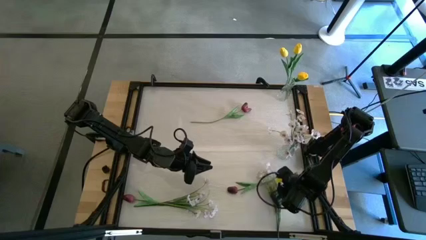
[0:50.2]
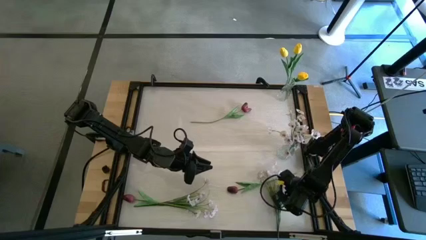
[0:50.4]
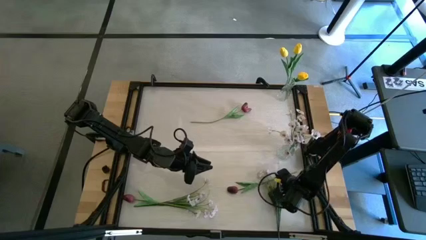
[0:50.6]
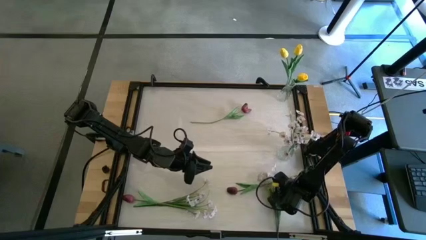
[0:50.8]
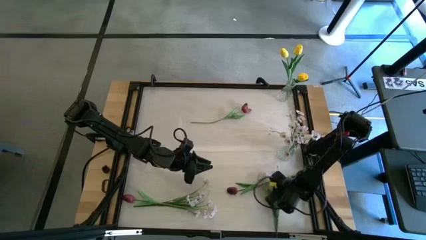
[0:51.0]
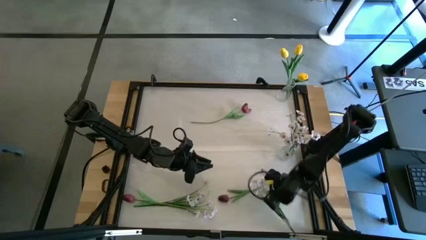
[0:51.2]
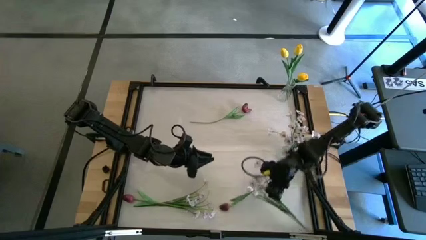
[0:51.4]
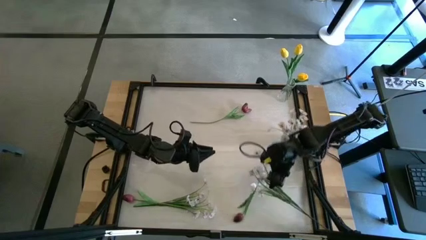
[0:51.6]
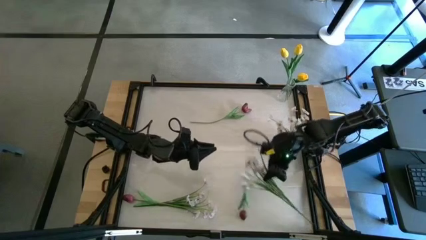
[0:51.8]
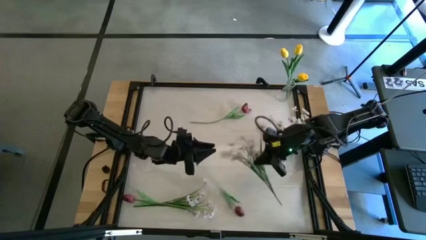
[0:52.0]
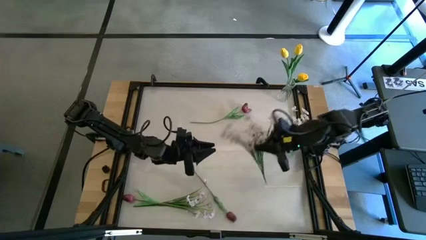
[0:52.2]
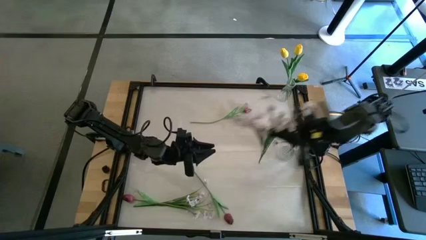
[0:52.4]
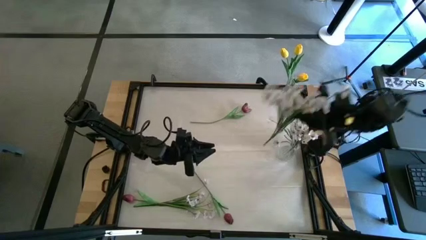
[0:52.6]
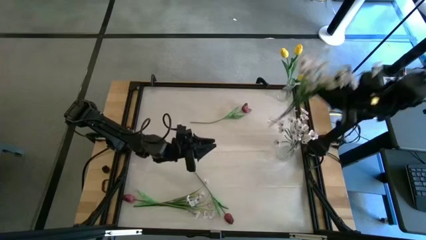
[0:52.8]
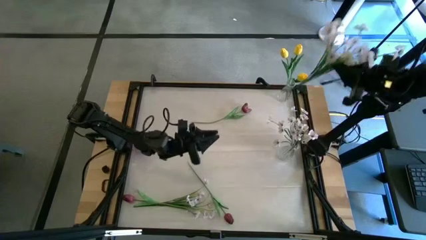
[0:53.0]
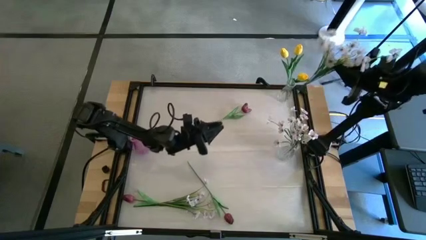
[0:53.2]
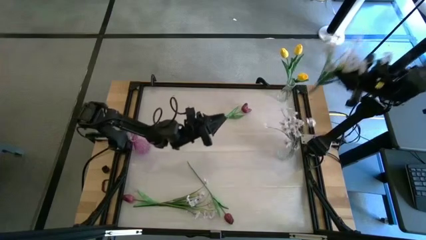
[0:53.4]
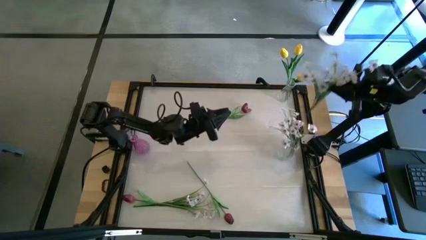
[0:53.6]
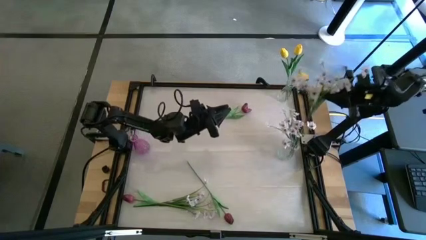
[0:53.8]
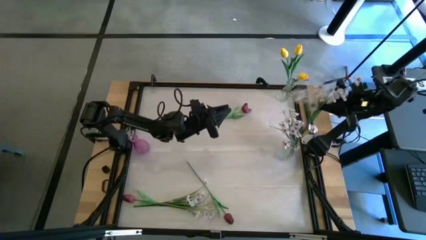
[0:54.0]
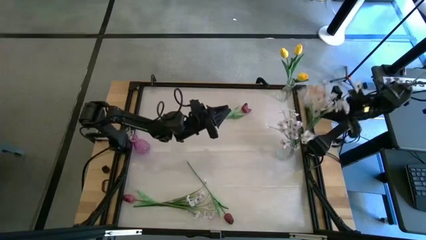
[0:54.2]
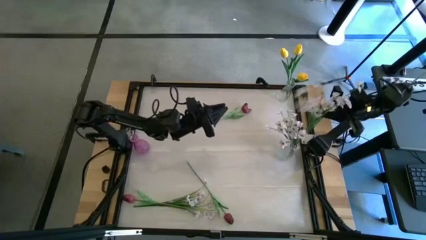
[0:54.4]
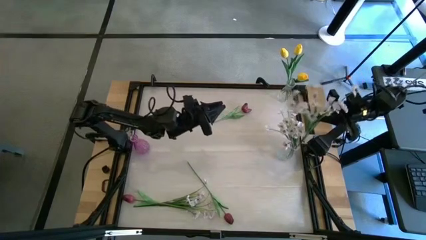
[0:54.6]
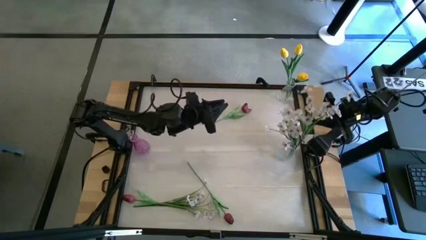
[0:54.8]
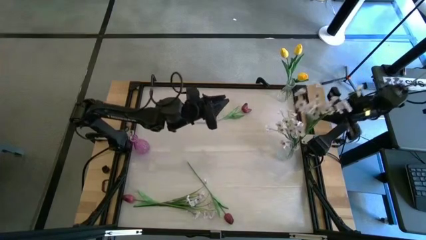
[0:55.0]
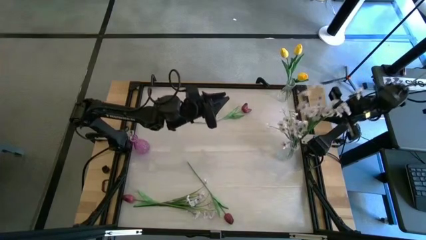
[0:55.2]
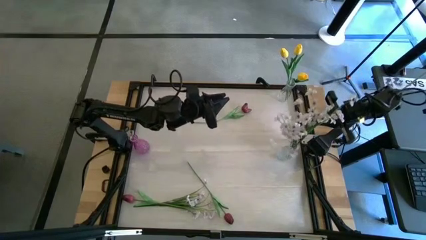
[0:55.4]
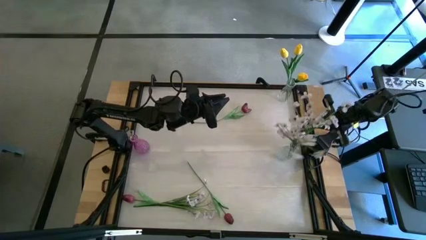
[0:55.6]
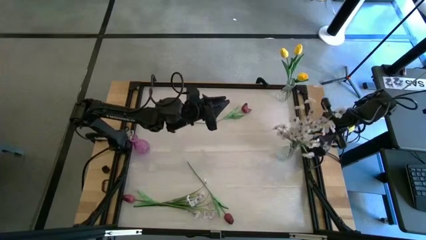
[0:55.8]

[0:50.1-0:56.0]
Task: Sort flowers into vase by color
Put the right white flowers into the bottom transparent vase

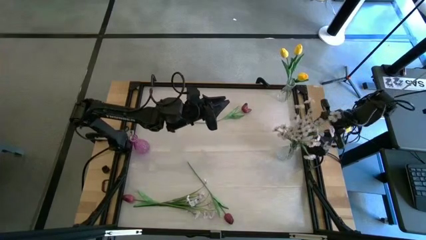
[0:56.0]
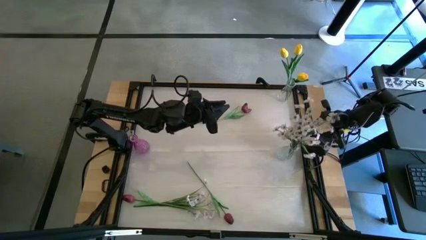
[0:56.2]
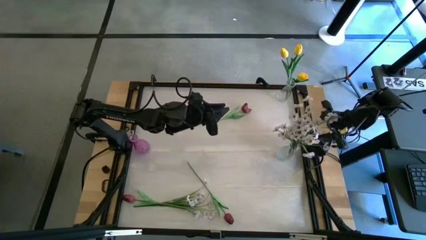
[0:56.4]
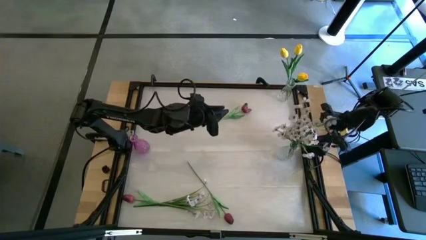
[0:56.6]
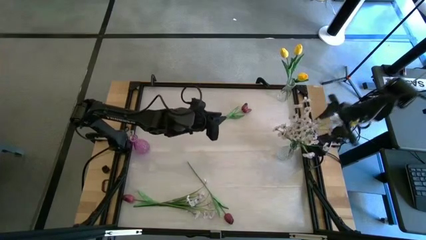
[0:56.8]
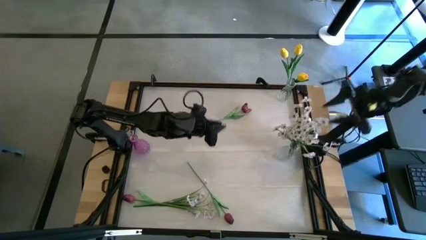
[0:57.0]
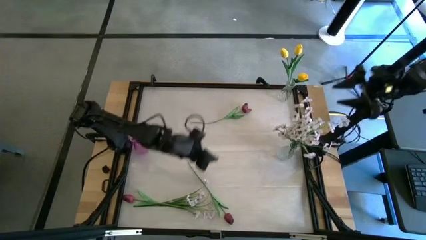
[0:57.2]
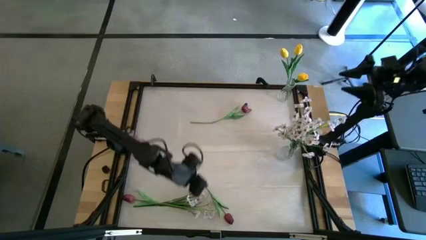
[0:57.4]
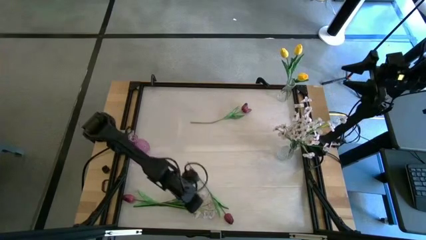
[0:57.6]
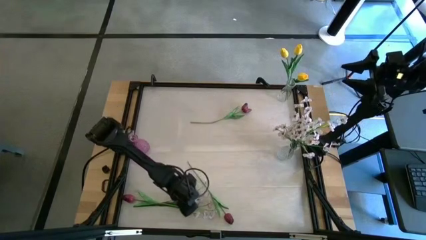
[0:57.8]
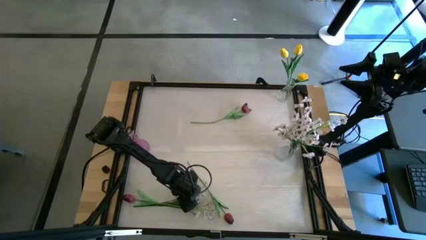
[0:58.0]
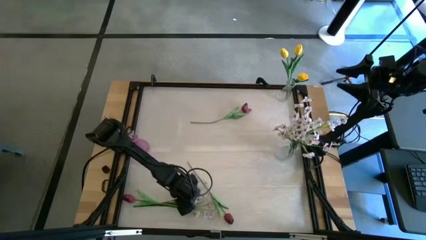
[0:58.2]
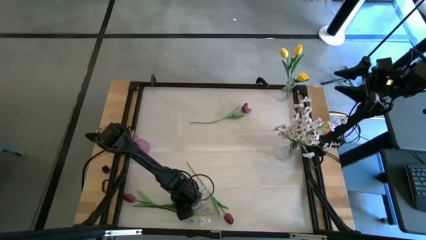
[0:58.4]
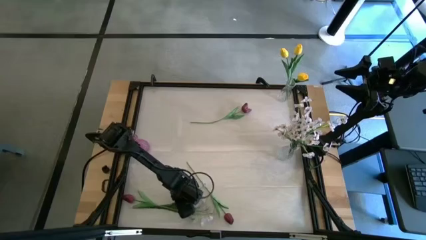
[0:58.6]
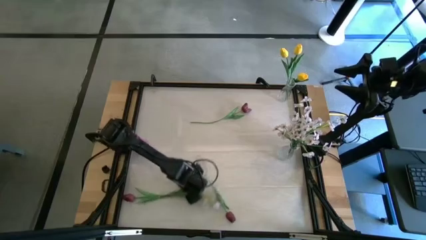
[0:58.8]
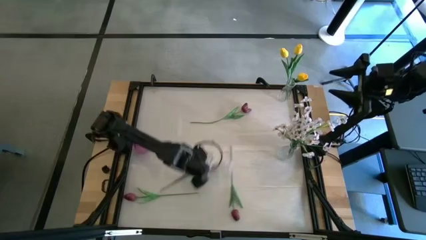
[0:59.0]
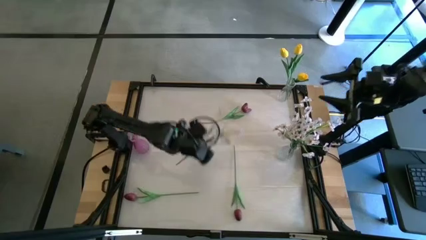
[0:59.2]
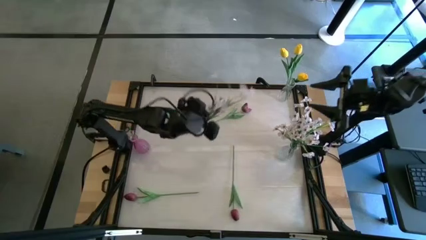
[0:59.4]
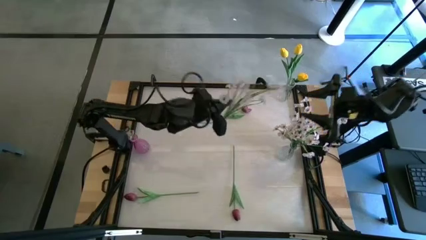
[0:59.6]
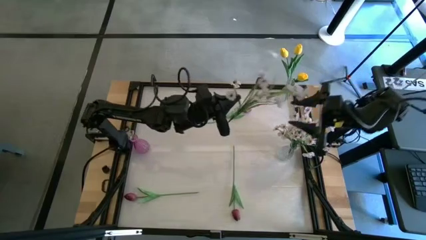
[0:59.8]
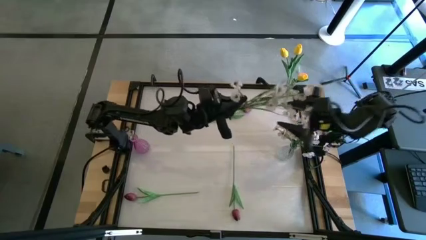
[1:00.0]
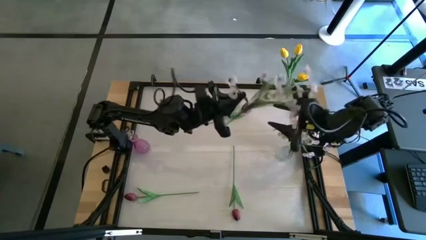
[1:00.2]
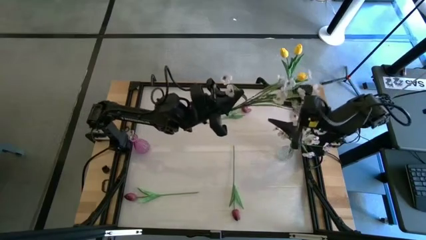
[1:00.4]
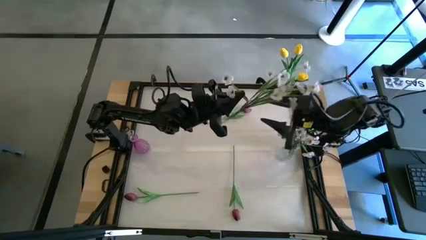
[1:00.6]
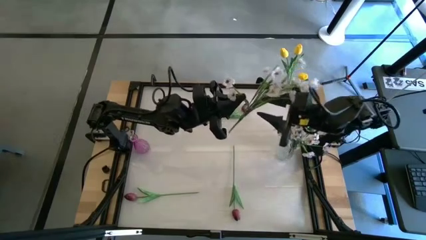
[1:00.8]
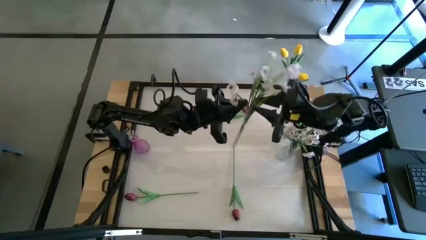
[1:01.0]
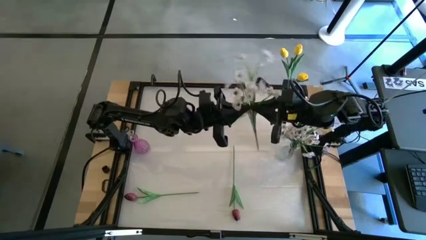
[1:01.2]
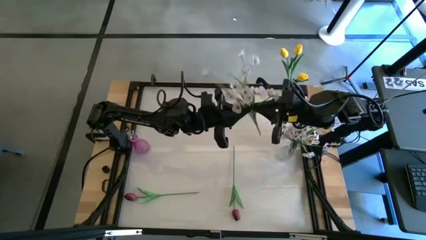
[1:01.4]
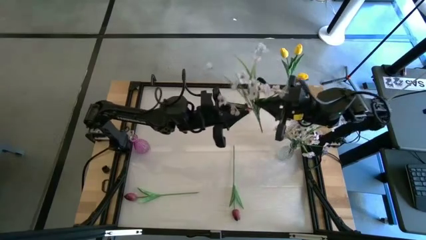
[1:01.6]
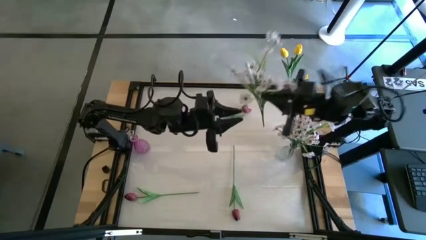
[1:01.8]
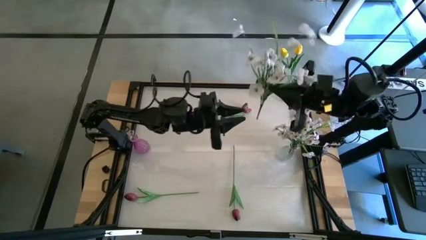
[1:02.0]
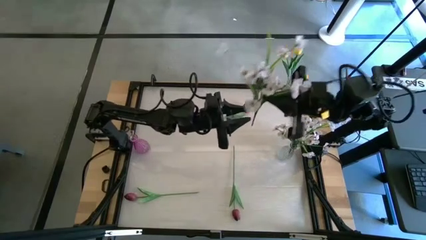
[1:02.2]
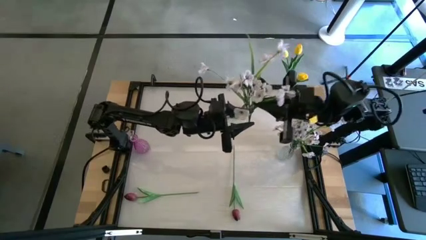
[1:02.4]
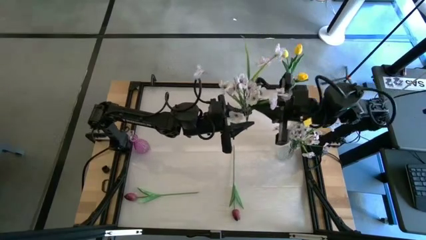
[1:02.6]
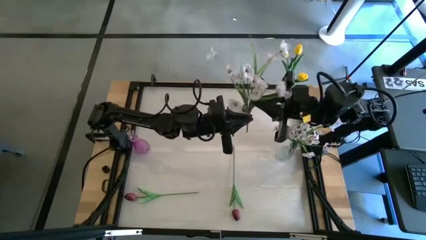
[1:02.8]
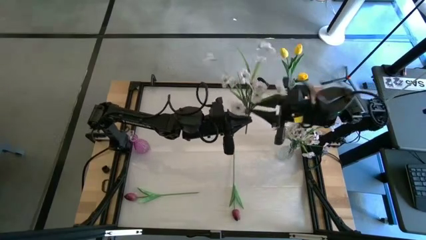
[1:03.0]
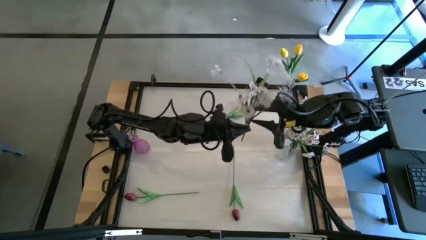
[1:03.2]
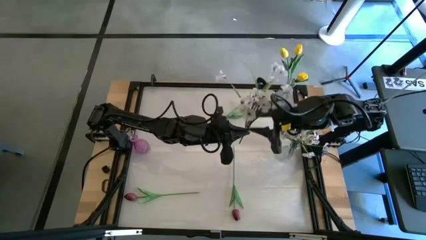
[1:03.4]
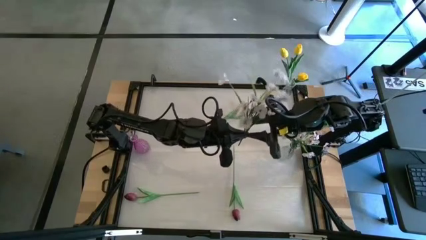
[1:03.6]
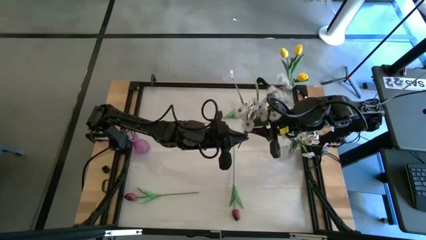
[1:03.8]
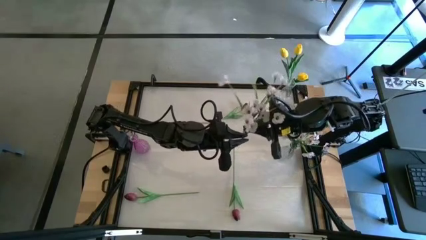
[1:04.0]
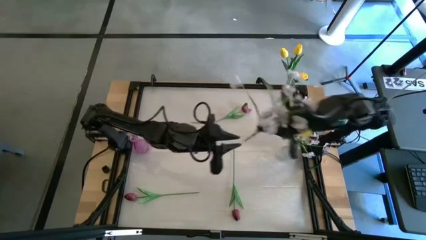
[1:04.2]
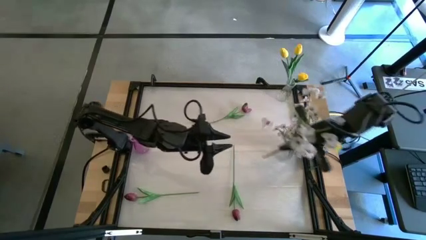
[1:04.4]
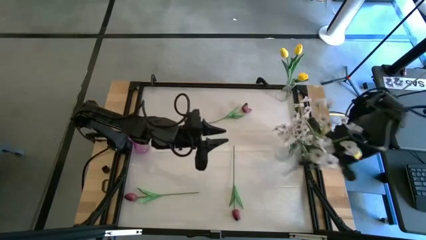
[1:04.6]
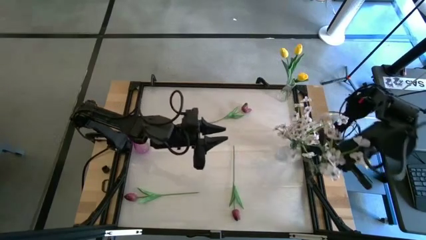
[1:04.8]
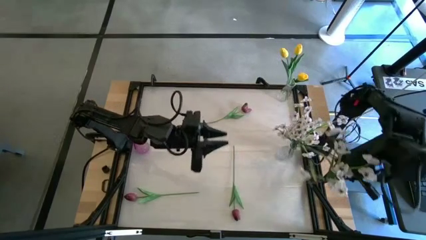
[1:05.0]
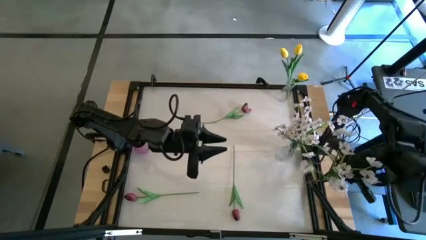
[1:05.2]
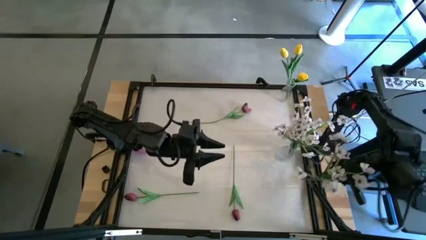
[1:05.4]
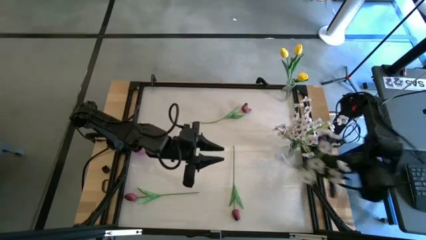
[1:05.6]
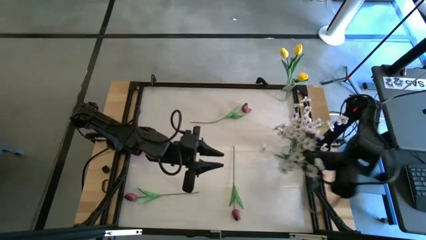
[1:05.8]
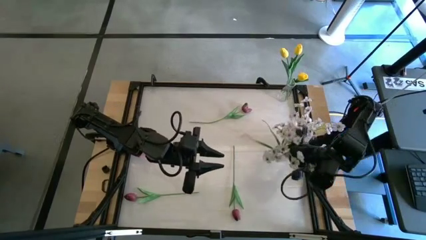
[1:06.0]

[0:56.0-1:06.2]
Put the white flowers into the bottom transparent vase
